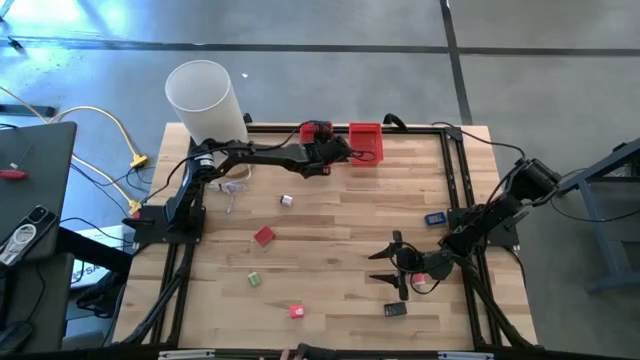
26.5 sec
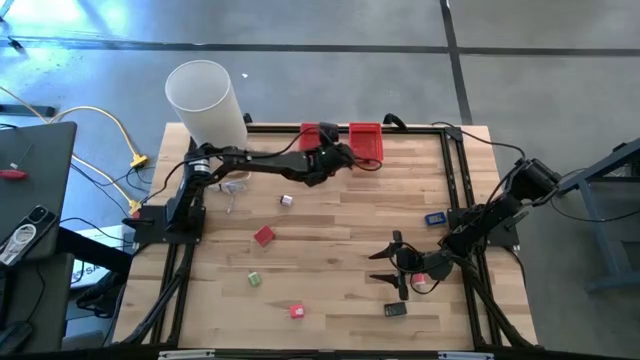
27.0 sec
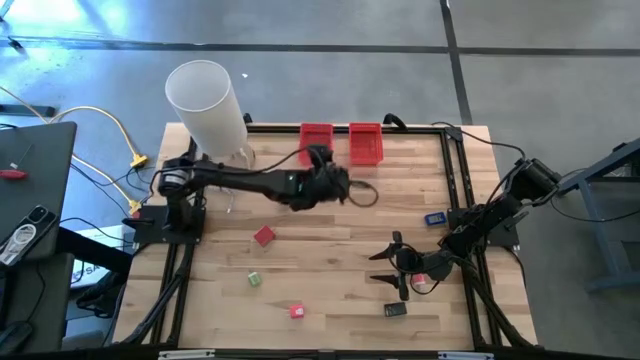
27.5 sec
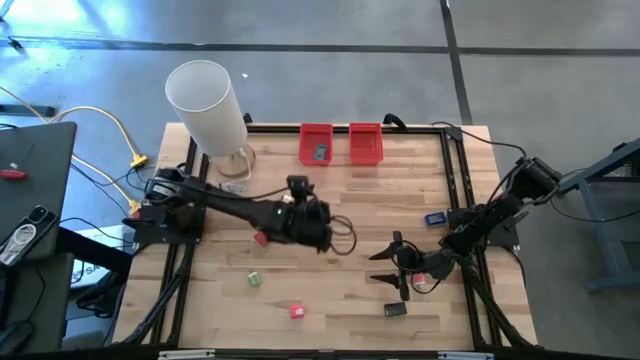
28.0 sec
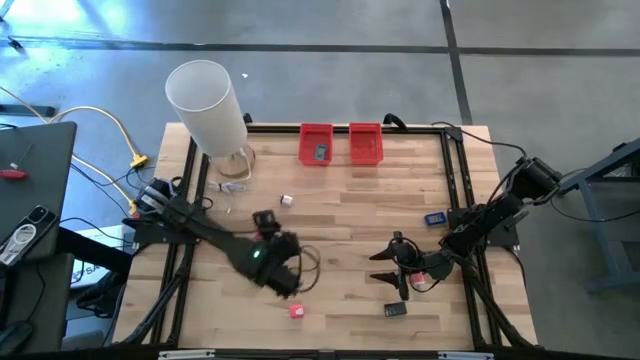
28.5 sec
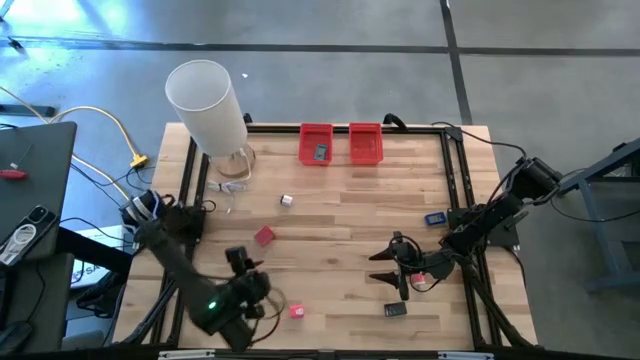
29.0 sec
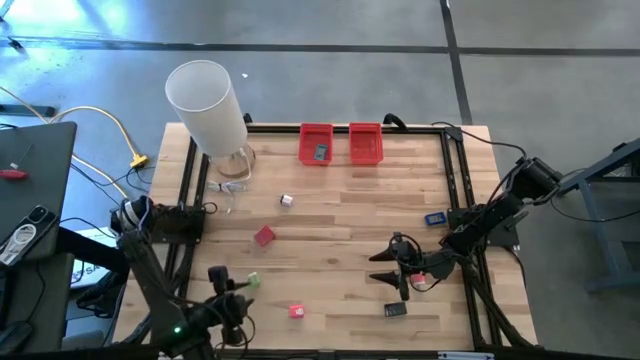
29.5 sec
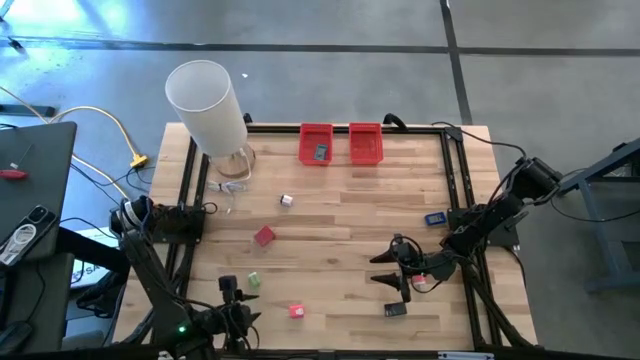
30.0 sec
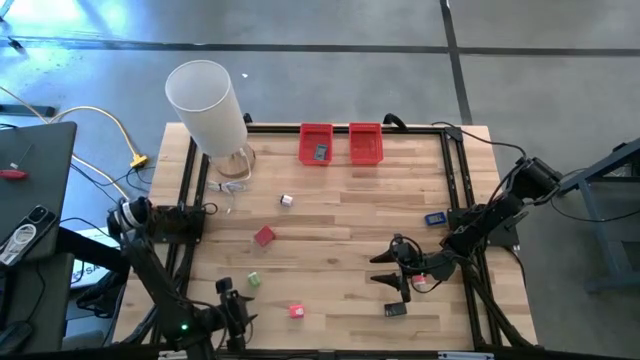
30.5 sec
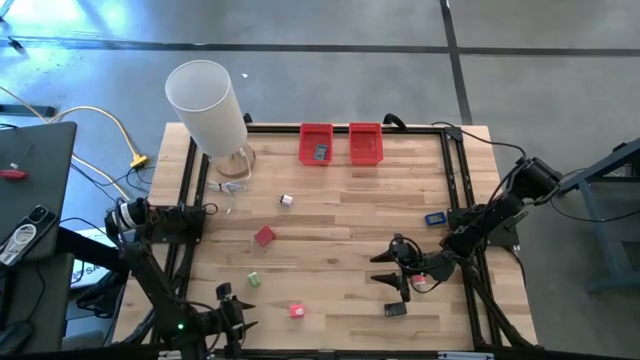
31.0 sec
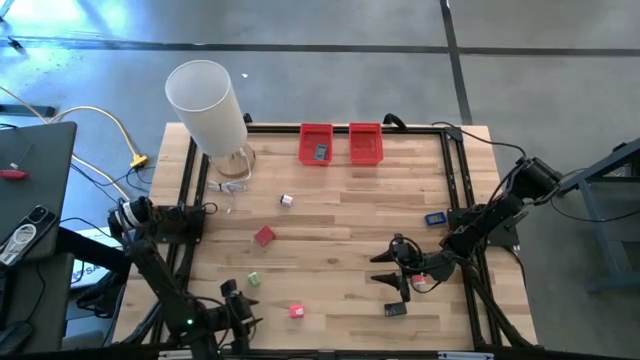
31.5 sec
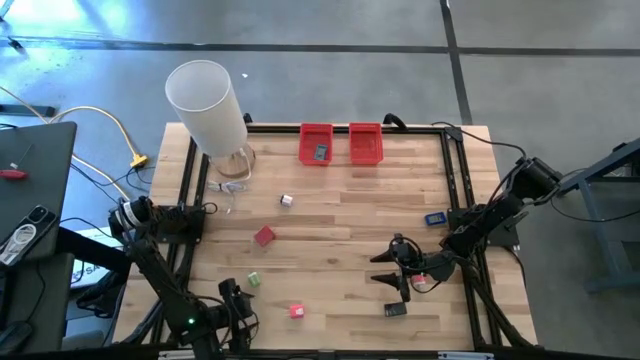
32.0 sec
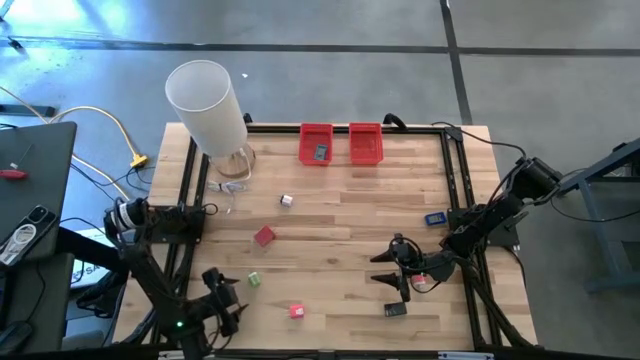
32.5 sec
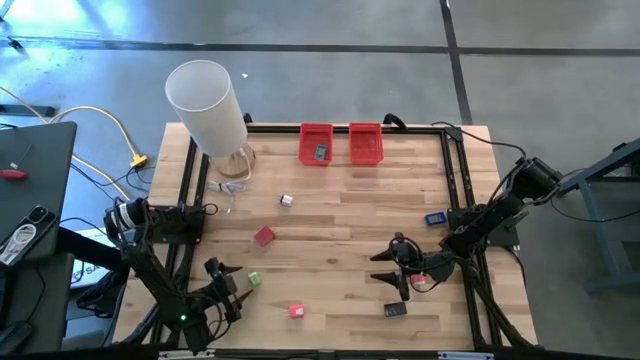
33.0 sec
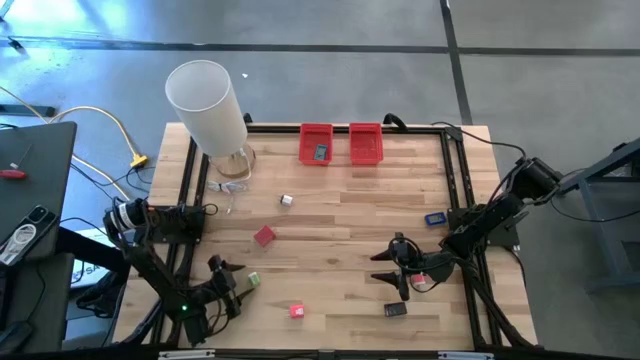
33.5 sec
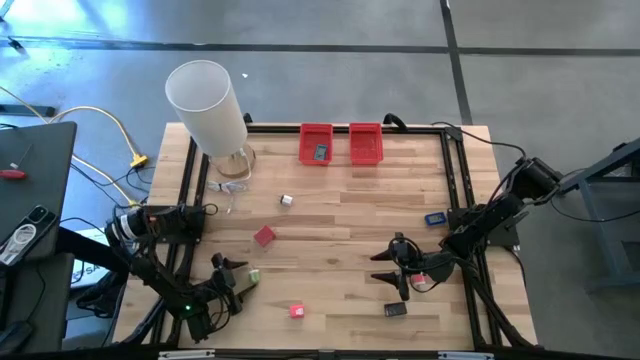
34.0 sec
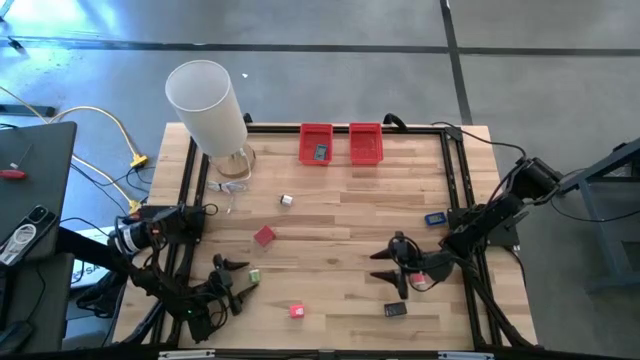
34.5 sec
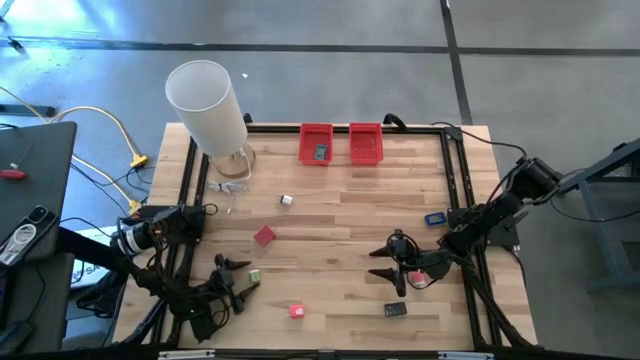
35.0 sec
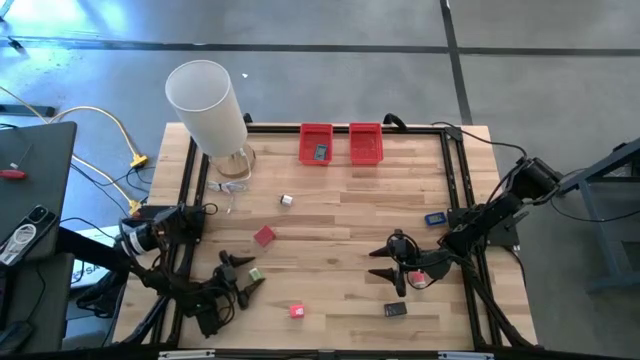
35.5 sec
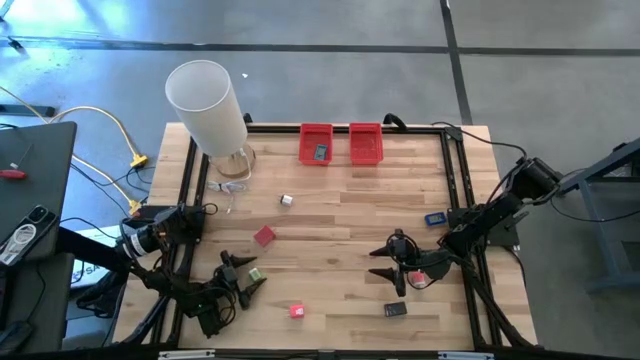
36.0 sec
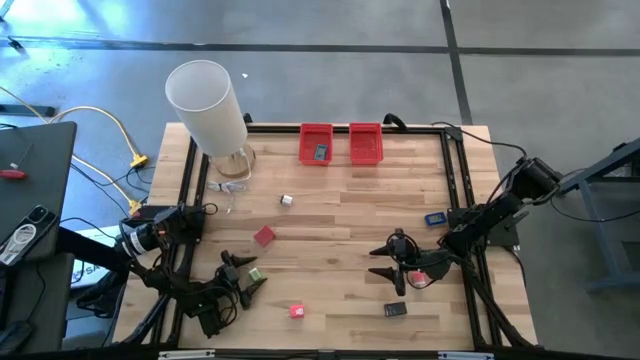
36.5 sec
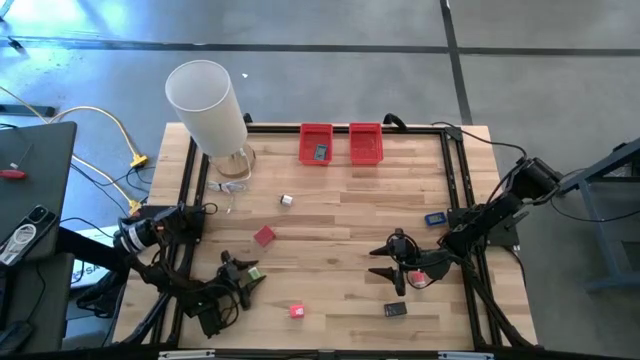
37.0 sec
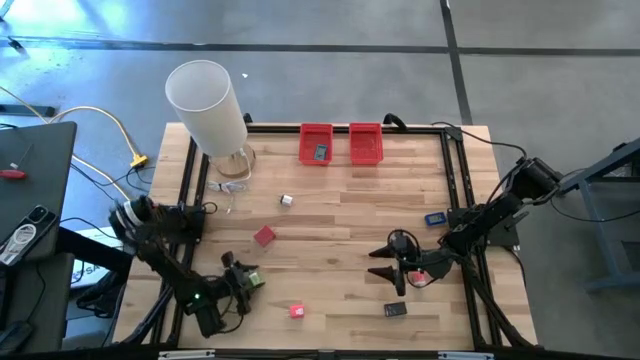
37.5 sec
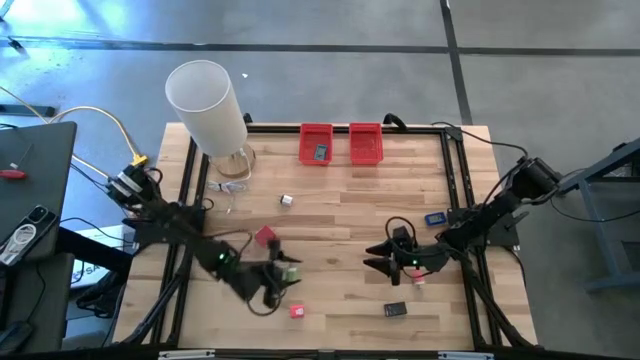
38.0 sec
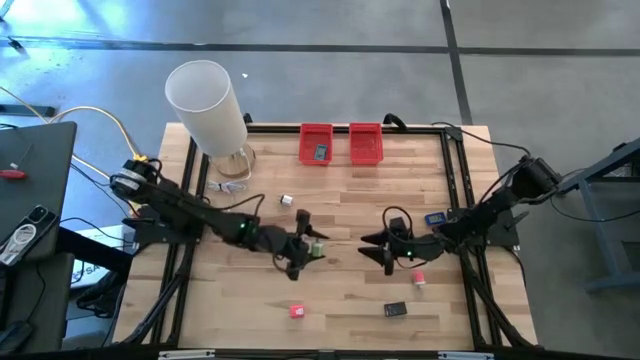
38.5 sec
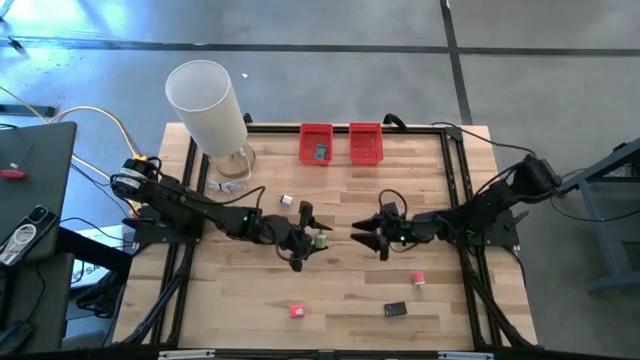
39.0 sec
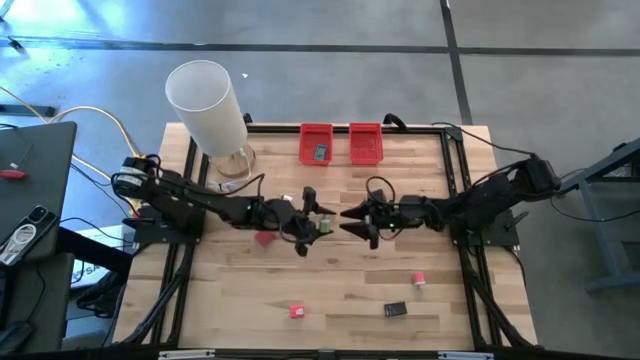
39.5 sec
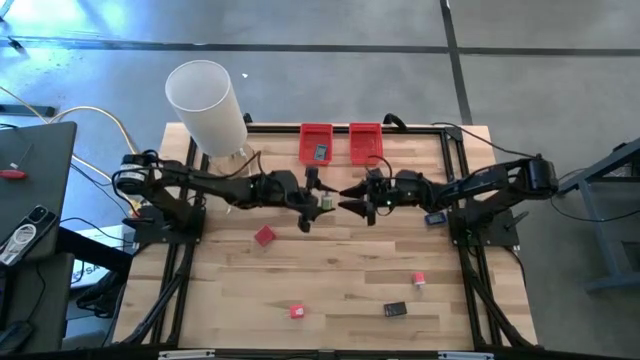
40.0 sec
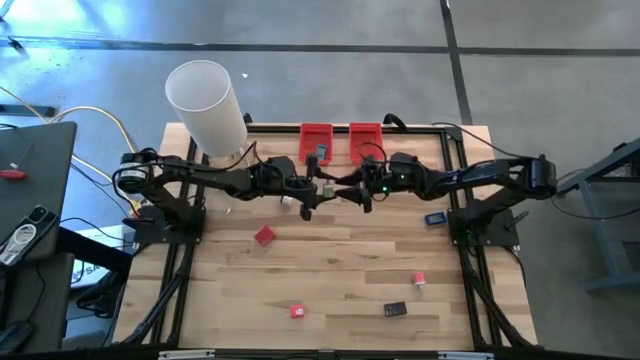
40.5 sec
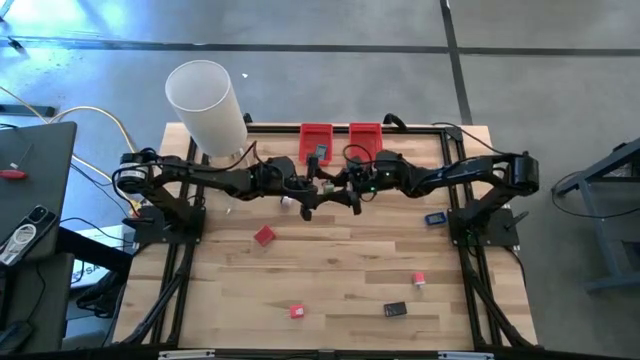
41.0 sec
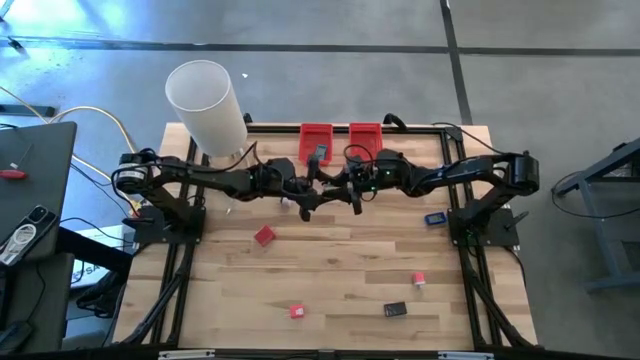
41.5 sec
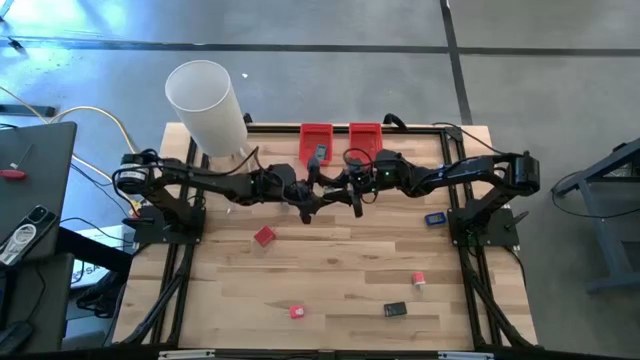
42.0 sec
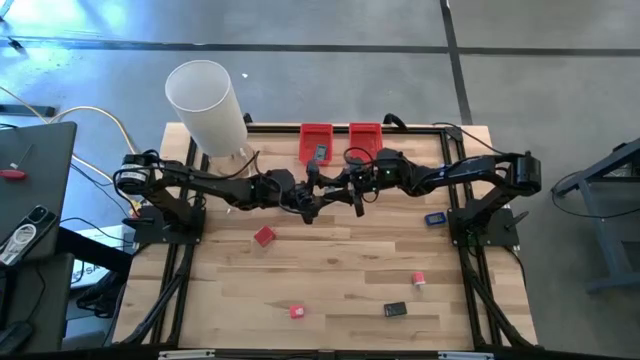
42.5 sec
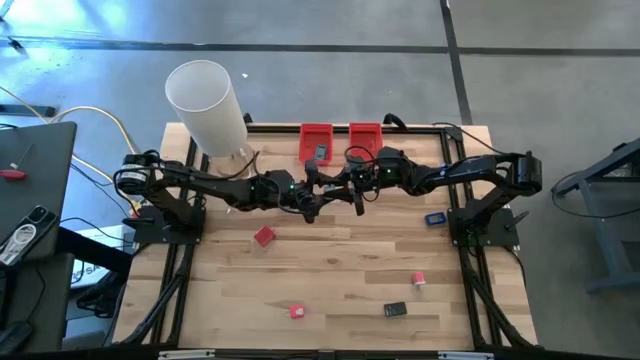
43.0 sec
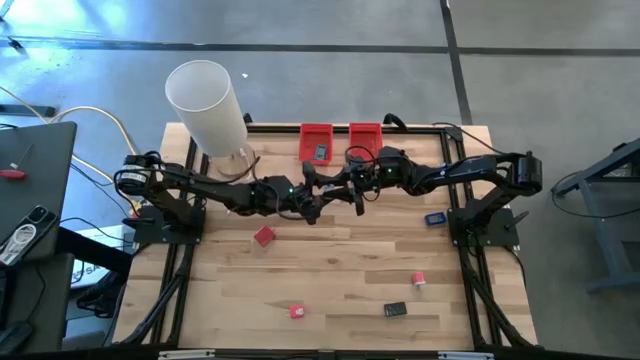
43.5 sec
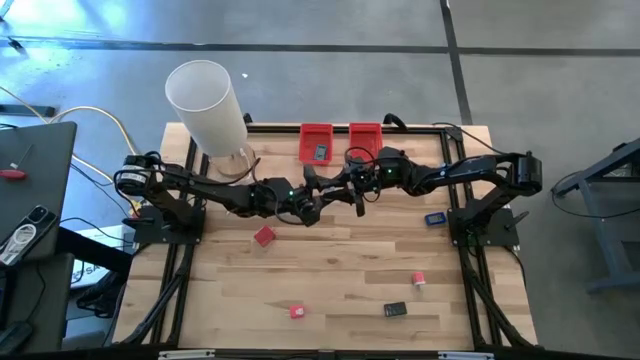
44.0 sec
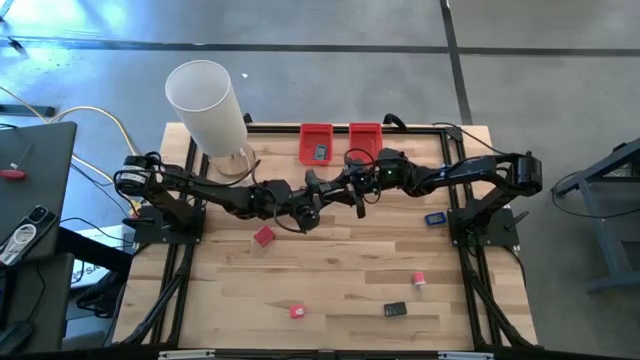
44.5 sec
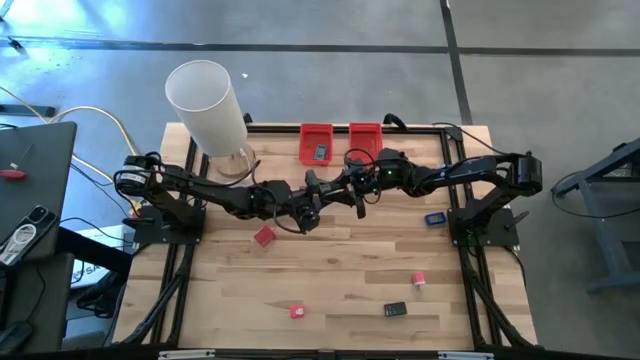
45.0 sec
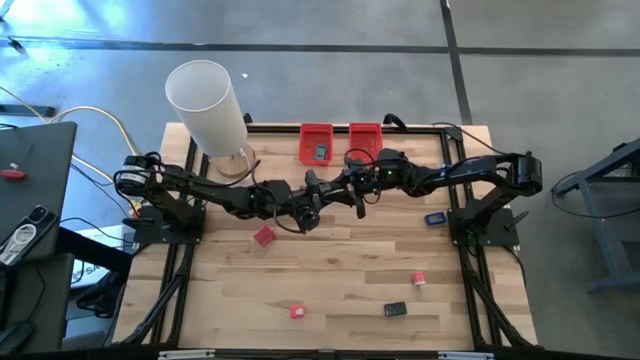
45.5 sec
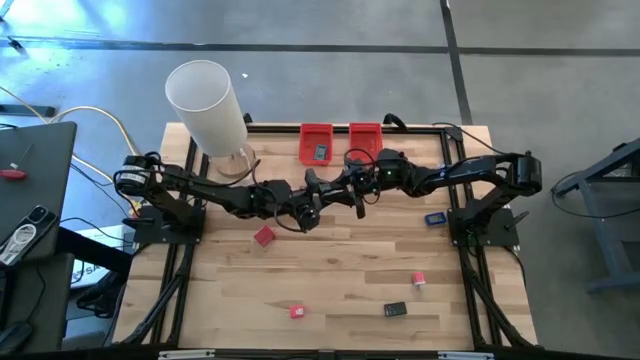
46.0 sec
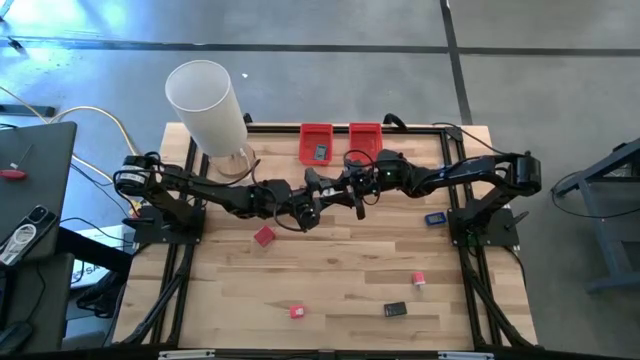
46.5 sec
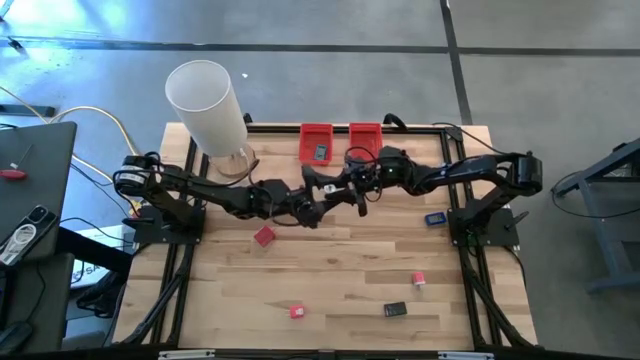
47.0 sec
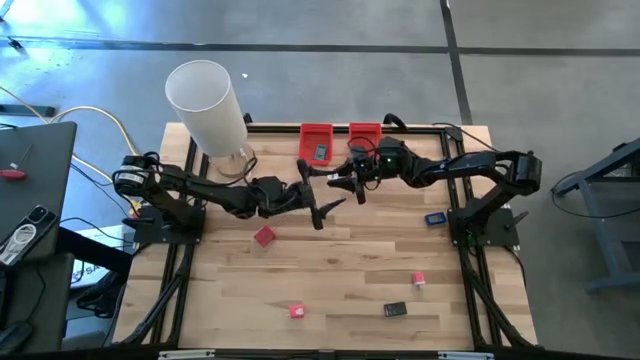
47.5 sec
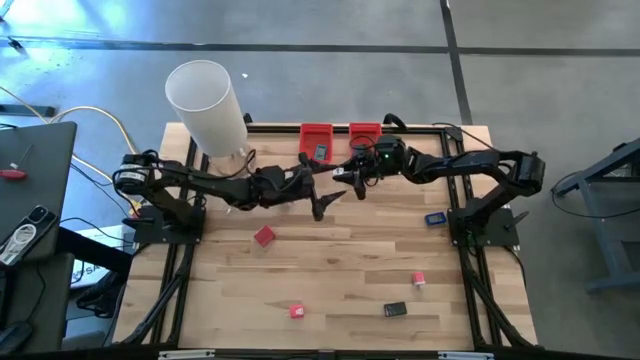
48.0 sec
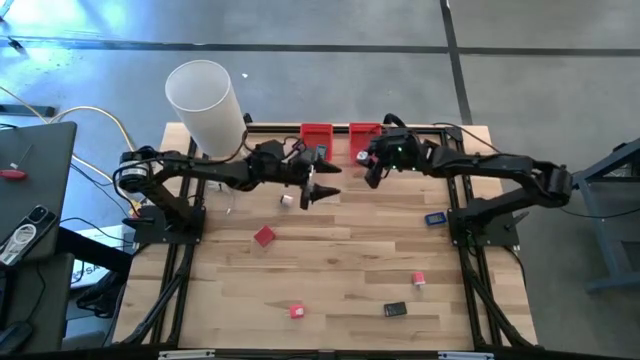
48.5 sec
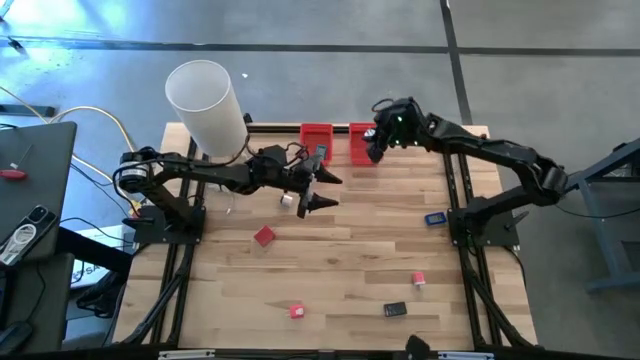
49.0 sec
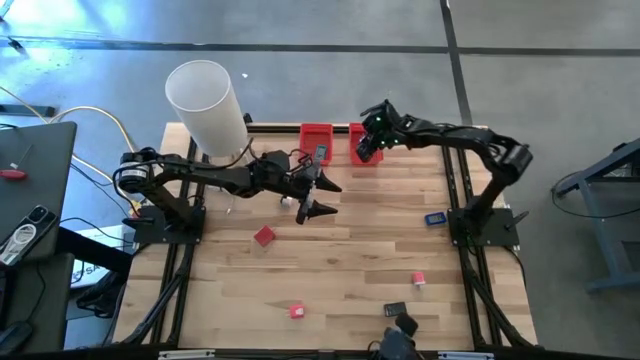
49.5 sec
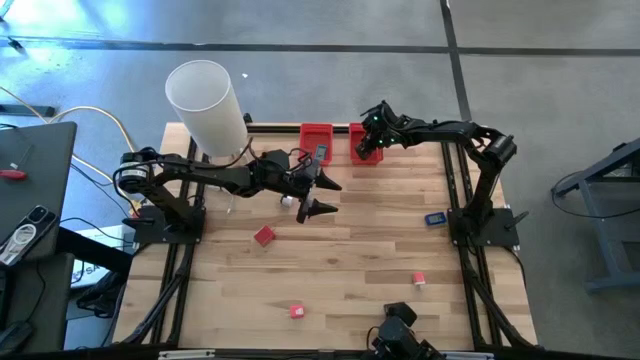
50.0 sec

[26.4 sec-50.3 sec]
Task: Pick & Place Office items
Put the green charger adapter into the right red bin
